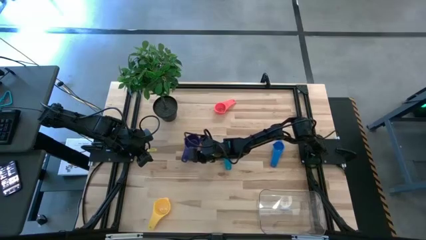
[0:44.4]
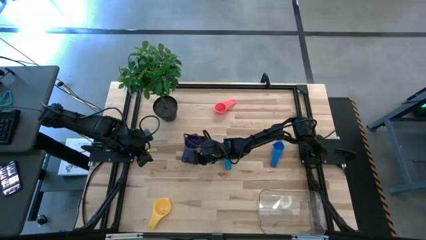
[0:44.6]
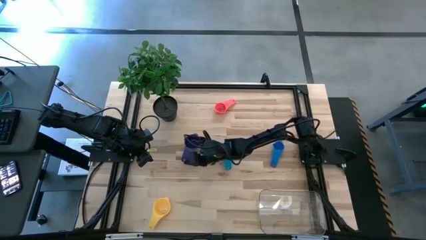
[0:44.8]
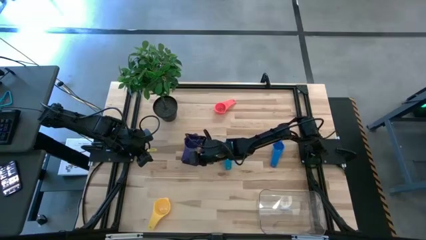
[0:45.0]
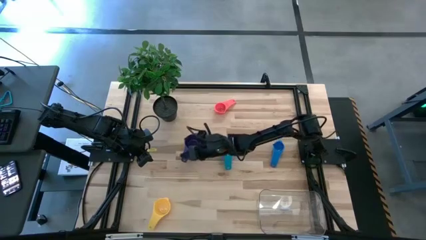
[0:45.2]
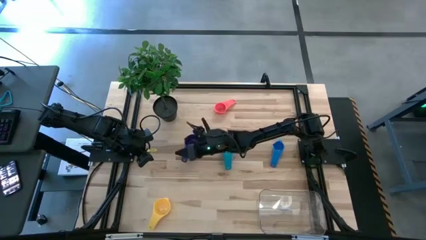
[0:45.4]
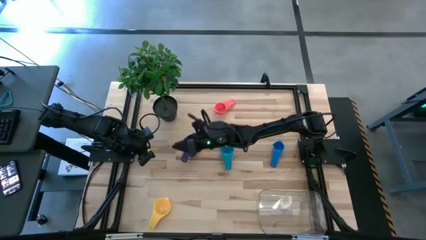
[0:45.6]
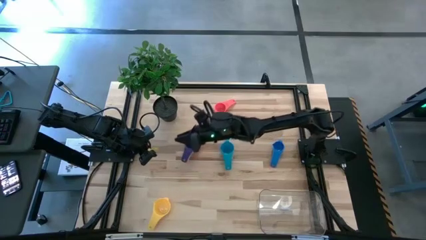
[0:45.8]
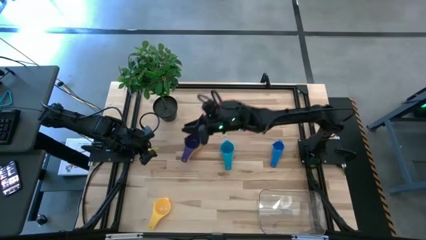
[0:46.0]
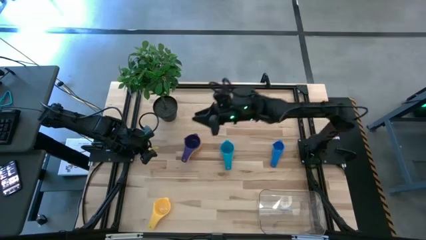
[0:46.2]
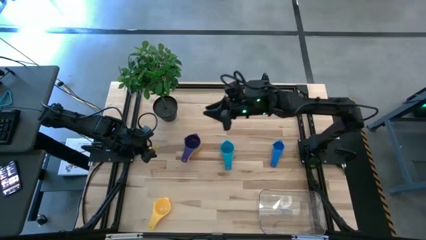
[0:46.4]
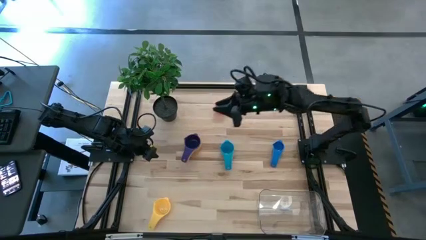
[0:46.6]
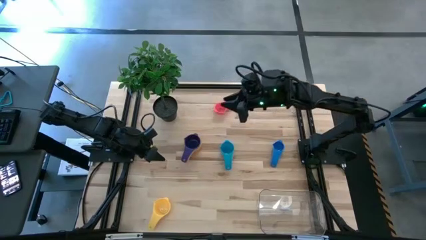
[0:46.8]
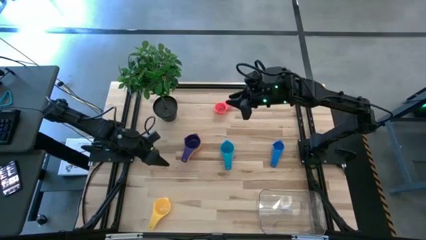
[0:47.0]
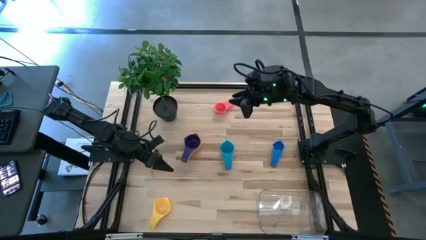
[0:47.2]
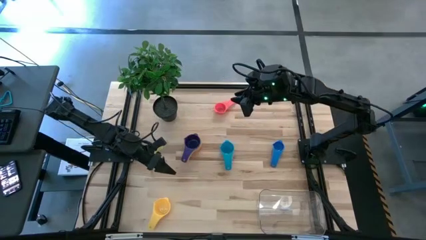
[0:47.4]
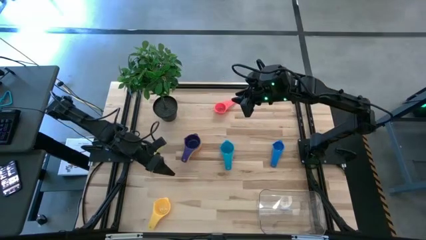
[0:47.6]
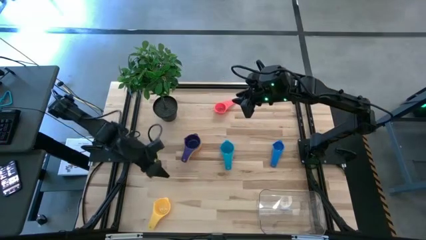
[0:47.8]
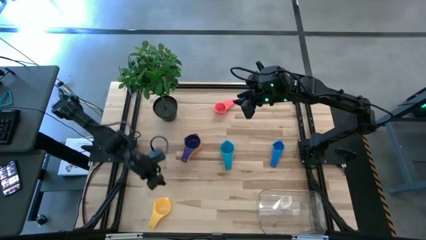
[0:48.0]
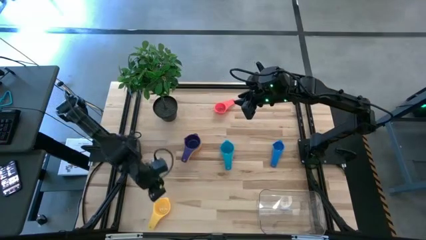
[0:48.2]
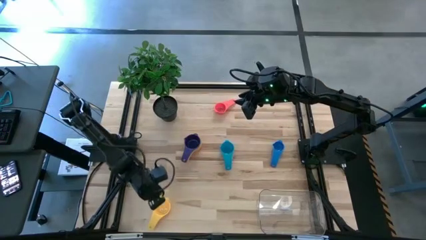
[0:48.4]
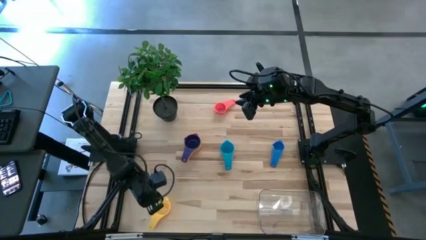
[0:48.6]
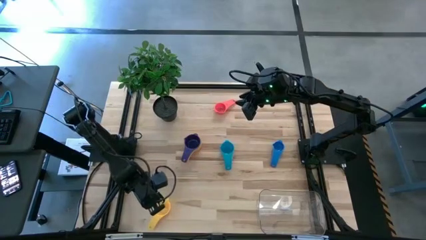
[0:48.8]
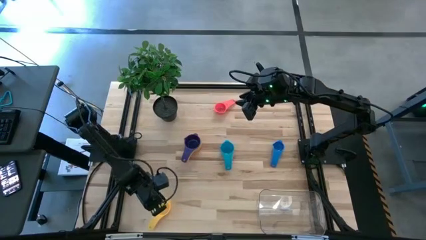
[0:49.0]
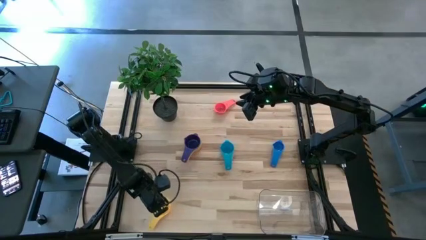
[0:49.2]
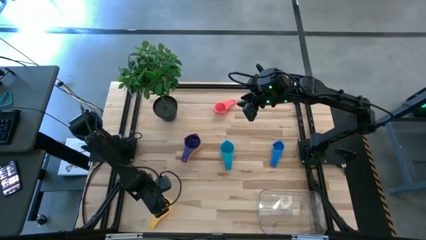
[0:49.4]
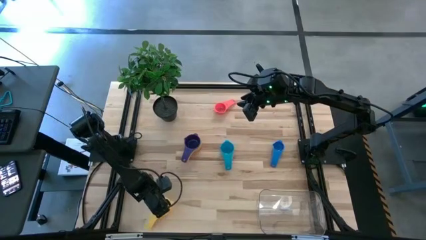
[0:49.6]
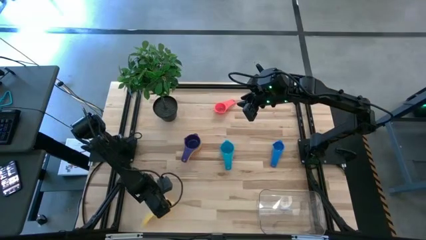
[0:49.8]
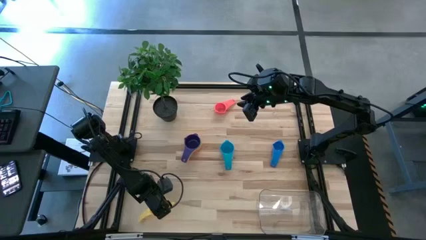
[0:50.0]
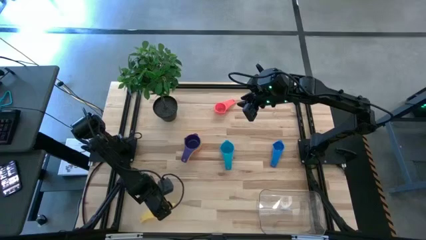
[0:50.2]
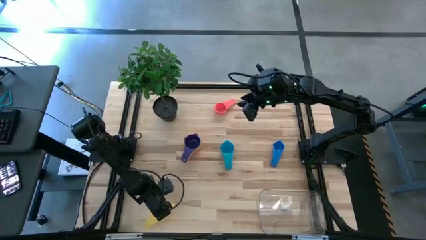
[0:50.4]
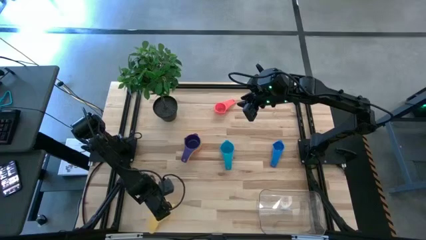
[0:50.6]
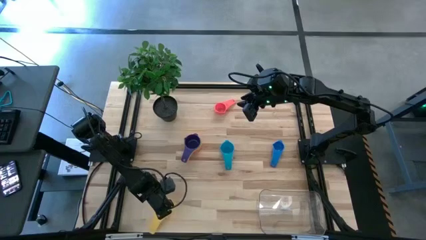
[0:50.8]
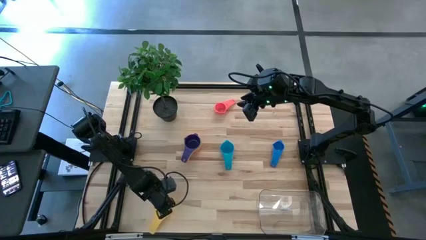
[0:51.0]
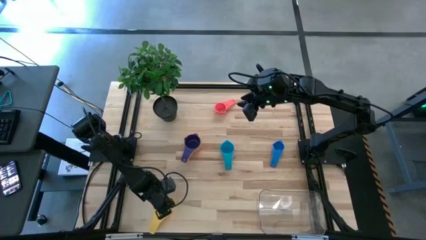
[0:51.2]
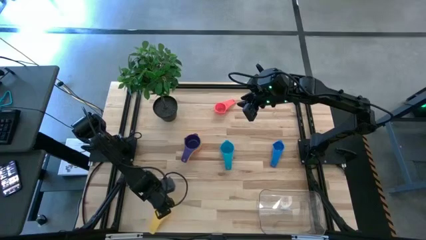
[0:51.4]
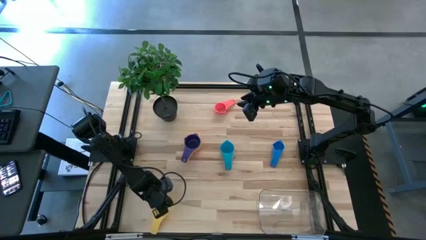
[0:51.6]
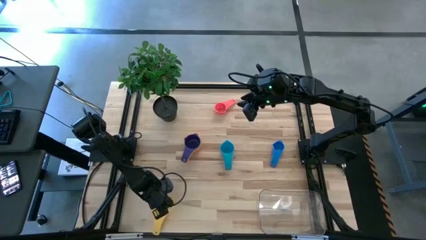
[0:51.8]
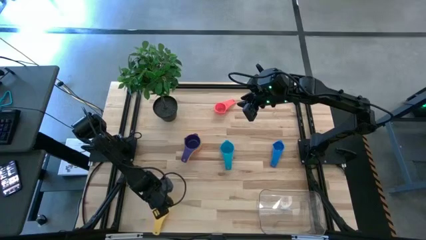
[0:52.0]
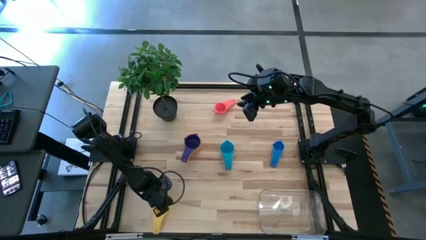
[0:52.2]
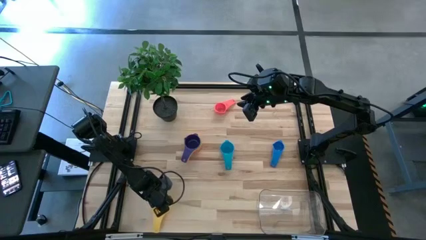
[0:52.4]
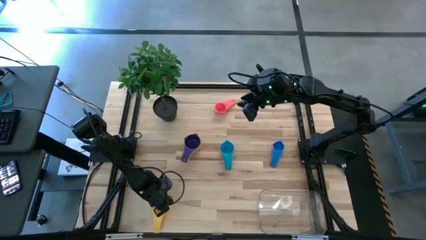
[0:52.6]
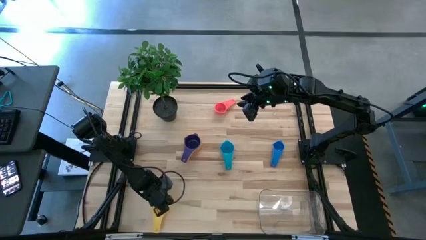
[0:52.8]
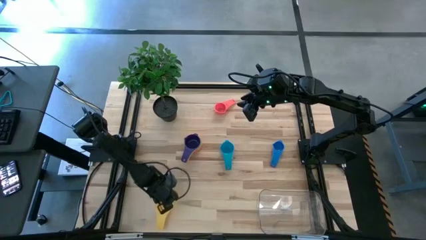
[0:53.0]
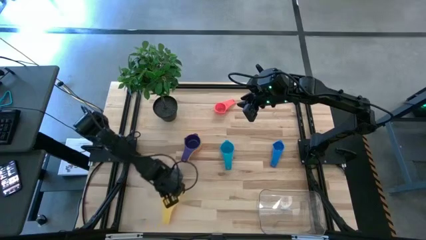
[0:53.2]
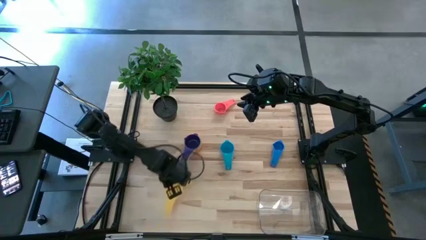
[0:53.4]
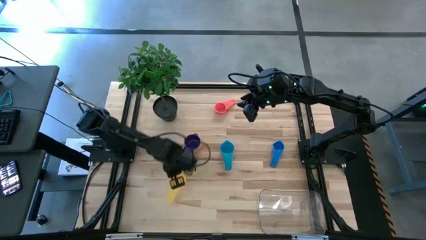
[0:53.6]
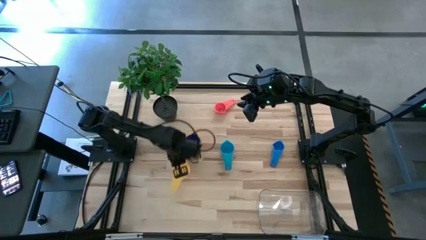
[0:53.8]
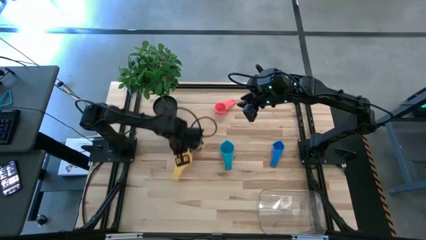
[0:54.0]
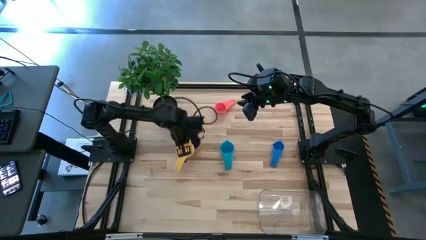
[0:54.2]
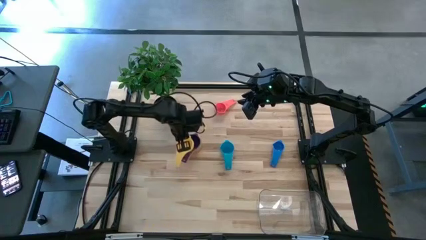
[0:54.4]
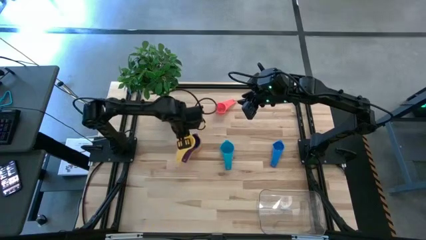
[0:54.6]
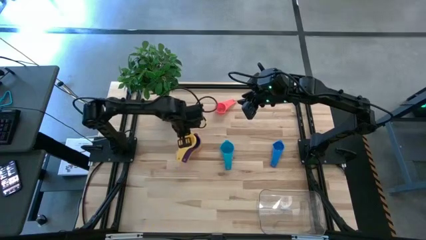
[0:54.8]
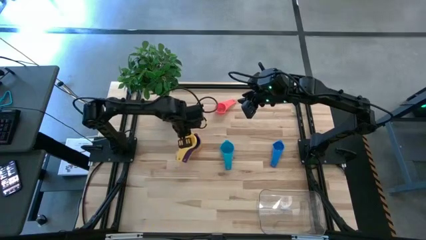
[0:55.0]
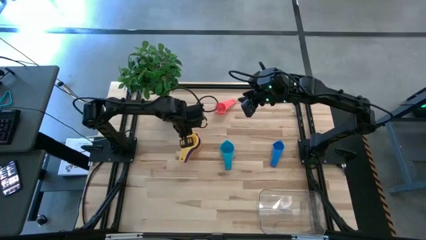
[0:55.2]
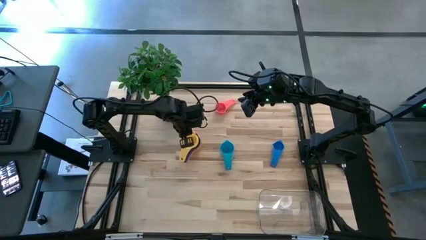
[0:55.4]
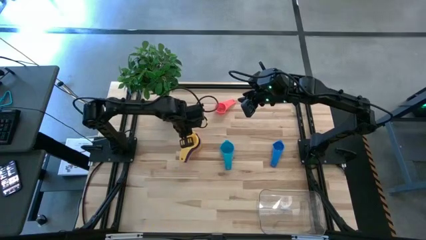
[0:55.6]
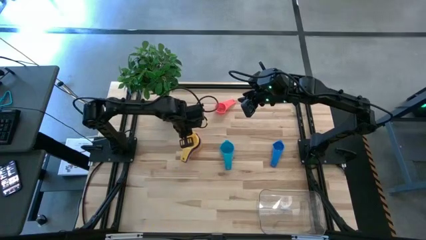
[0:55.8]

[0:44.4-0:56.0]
Task: Nest measuring cups in basket
Stack the yellow measuring cup on the violet measuring cup

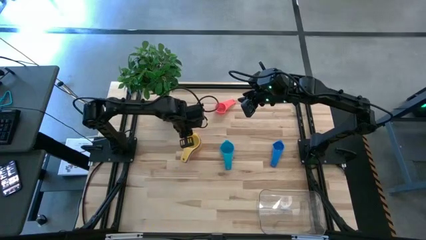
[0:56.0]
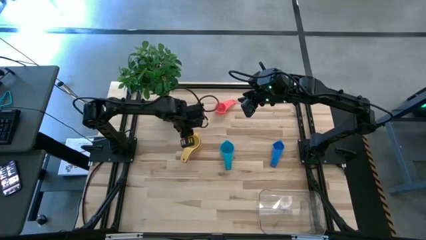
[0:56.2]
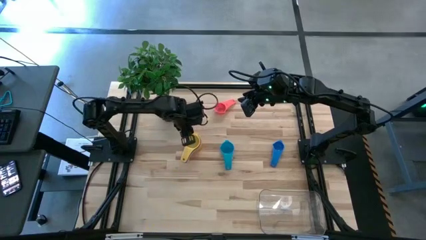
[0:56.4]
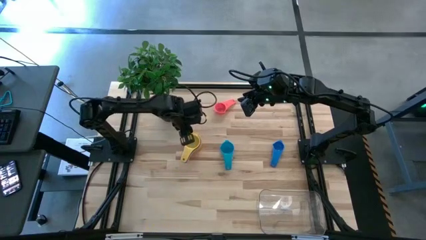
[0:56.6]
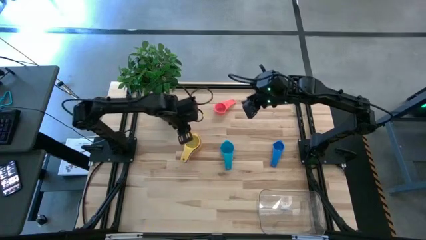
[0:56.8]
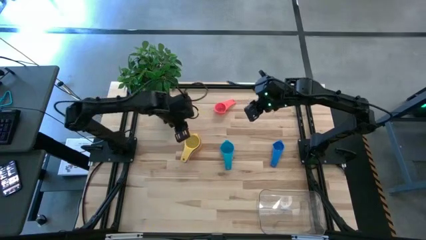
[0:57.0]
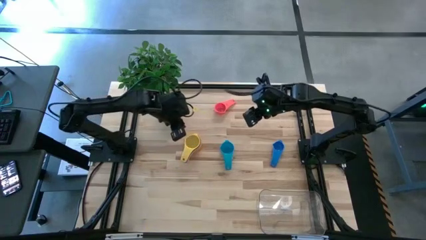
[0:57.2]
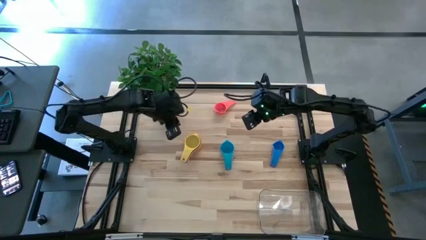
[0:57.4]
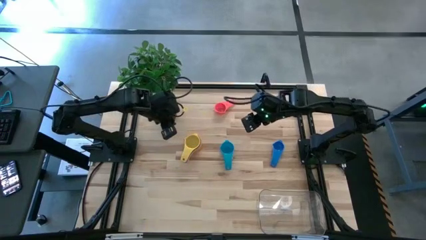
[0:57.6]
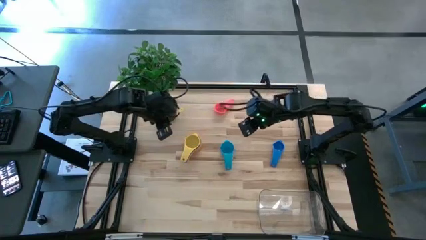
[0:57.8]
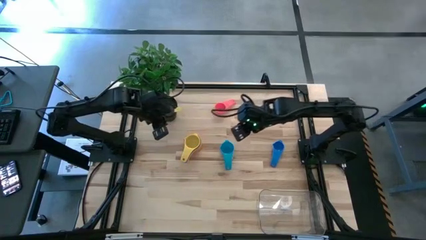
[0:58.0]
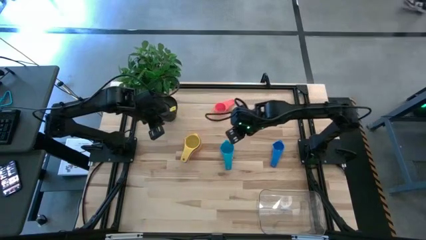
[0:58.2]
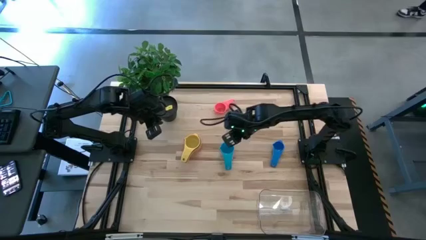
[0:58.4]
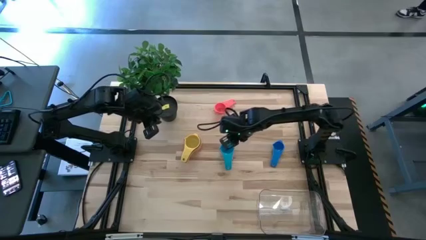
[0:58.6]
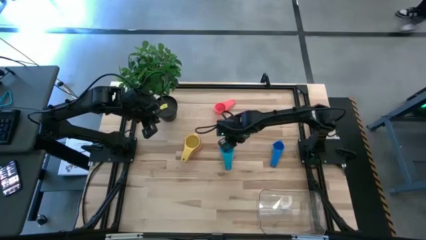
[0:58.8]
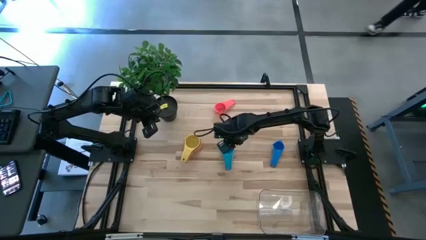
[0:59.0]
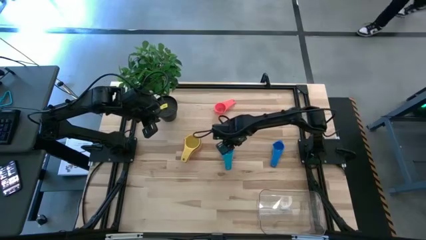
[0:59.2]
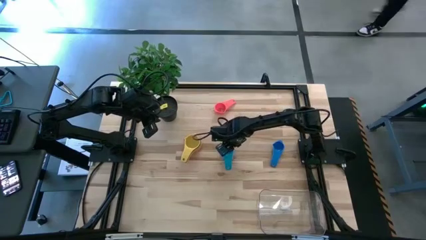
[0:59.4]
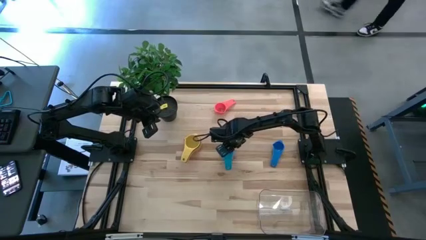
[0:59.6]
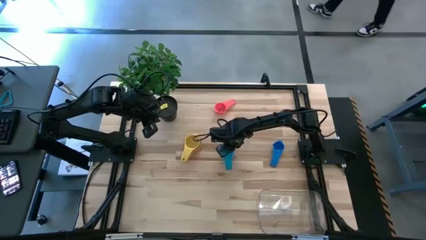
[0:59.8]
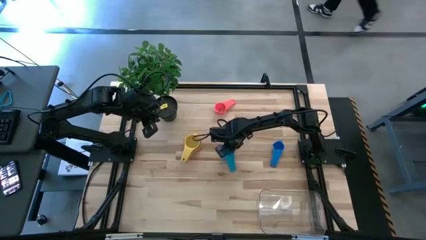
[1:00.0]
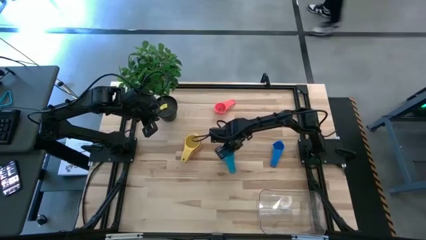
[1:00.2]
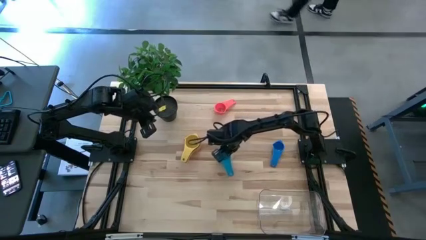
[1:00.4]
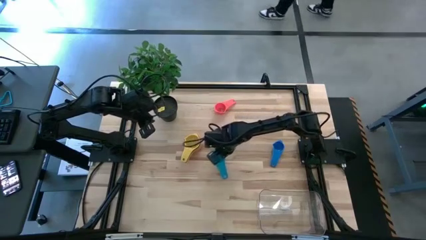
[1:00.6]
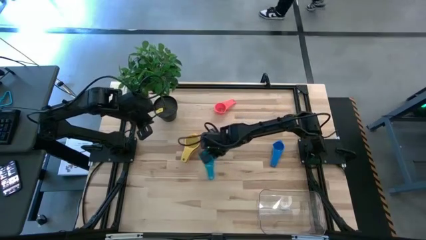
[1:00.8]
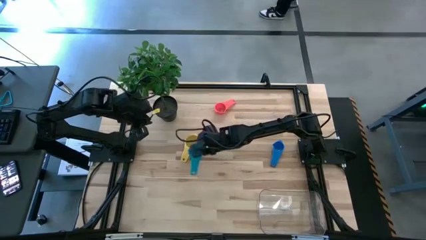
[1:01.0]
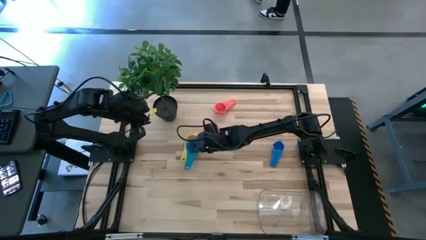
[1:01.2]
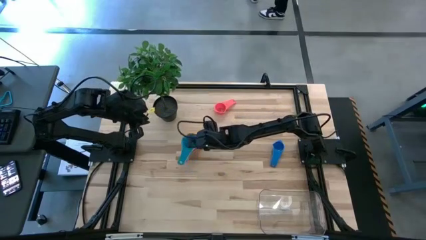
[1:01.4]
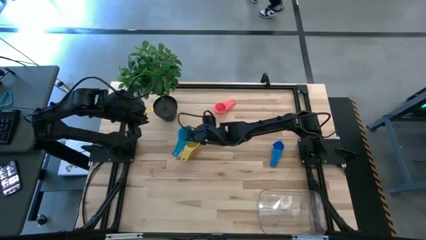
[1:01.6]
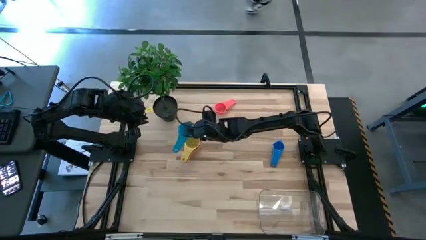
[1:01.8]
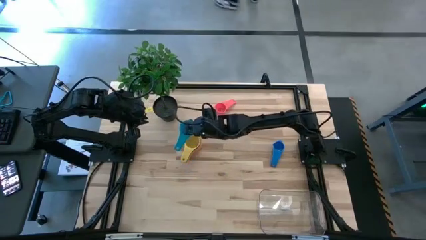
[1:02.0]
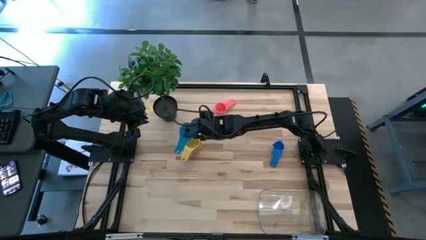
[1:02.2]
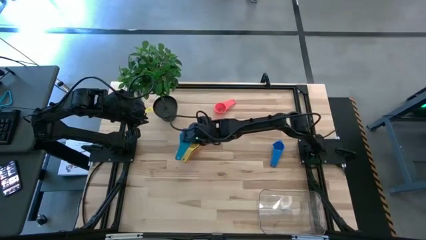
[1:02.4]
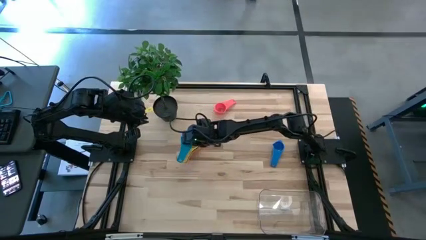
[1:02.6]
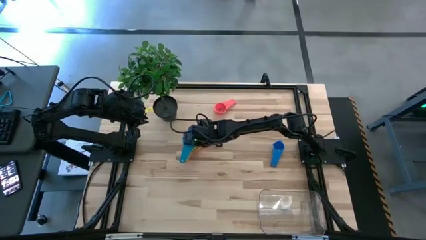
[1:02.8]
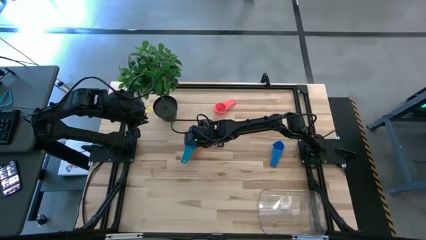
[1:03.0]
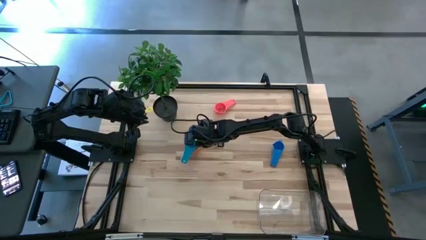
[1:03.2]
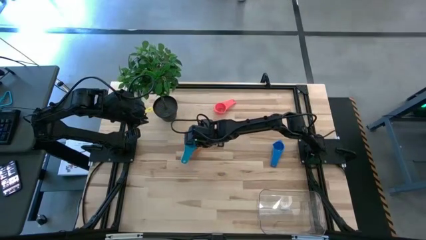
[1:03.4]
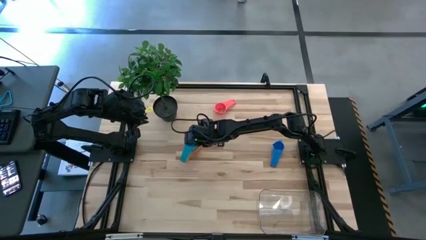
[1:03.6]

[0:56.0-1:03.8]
Stack the light blue measuring cup on the yellow measuring cup
